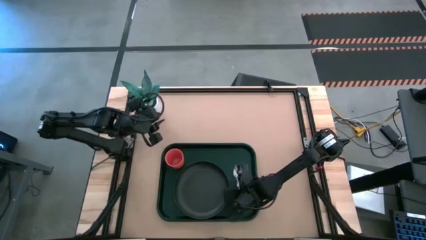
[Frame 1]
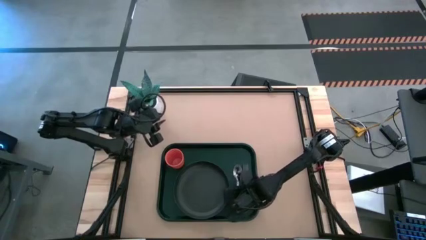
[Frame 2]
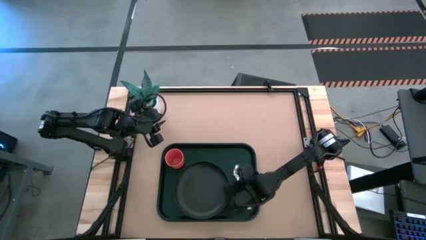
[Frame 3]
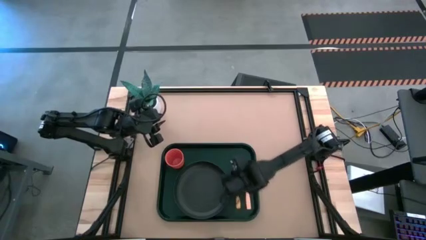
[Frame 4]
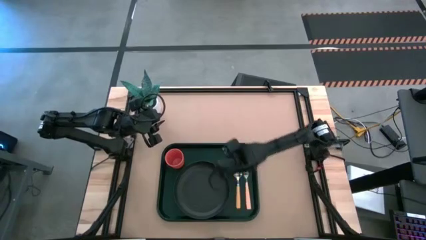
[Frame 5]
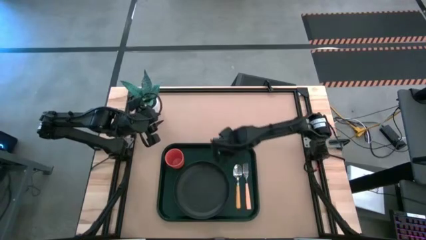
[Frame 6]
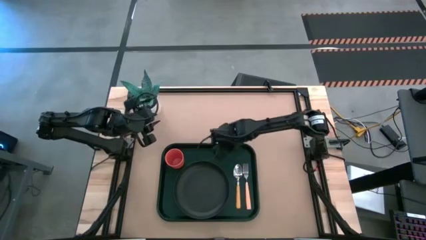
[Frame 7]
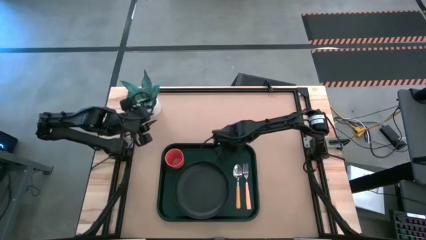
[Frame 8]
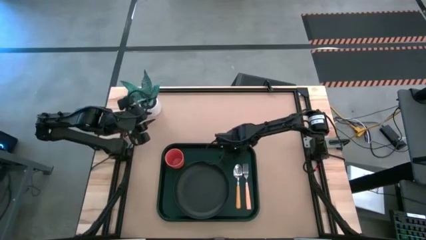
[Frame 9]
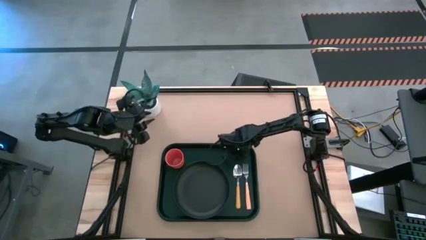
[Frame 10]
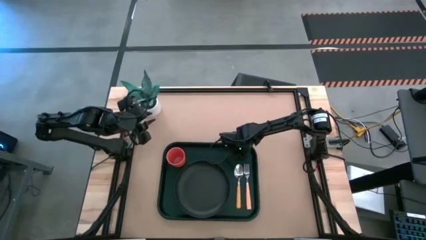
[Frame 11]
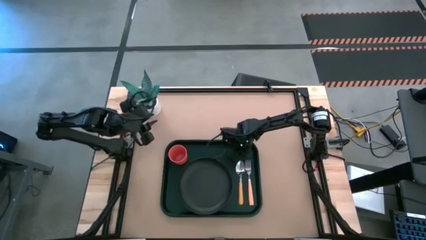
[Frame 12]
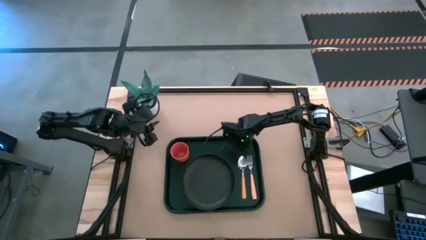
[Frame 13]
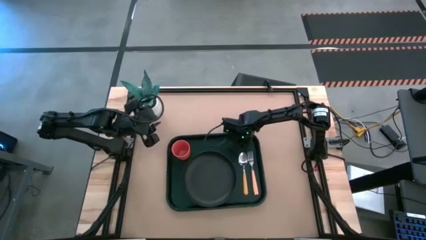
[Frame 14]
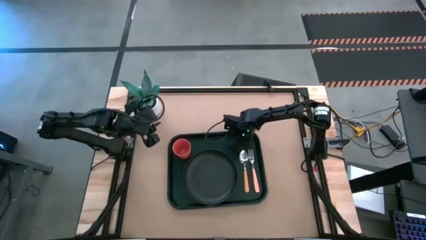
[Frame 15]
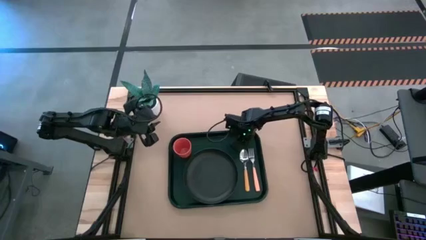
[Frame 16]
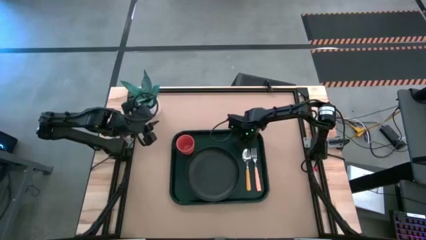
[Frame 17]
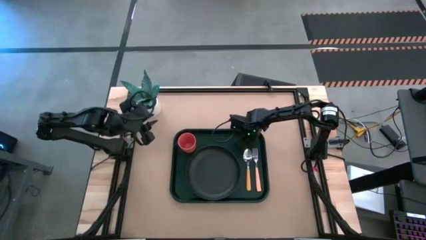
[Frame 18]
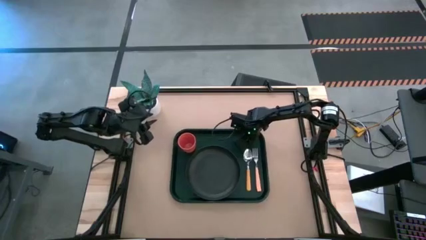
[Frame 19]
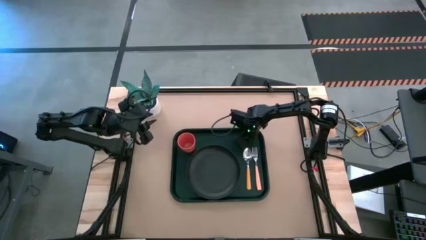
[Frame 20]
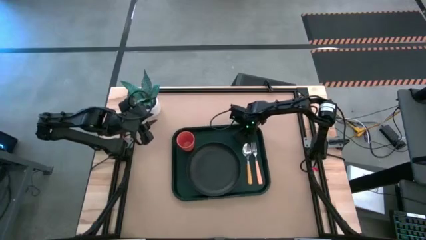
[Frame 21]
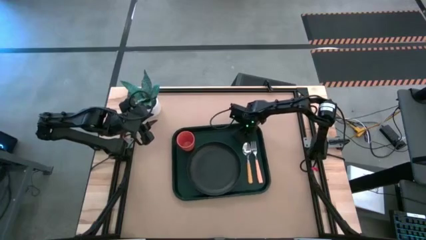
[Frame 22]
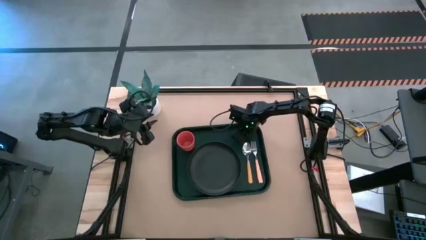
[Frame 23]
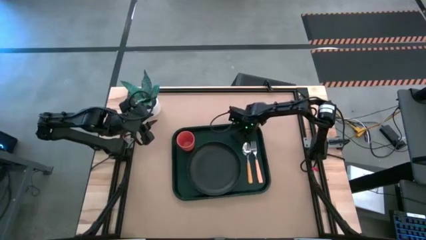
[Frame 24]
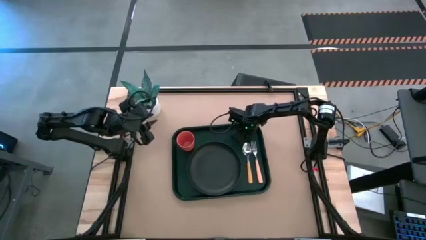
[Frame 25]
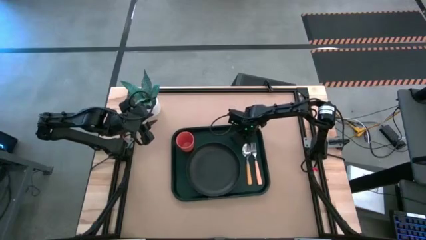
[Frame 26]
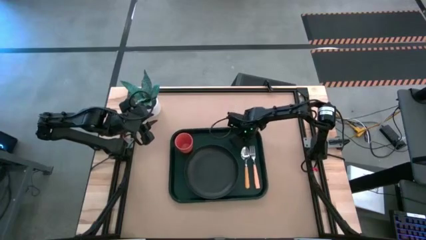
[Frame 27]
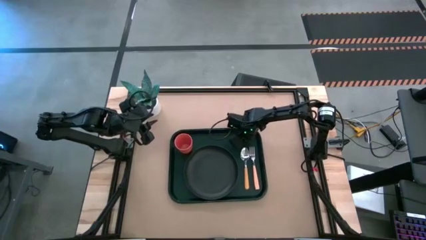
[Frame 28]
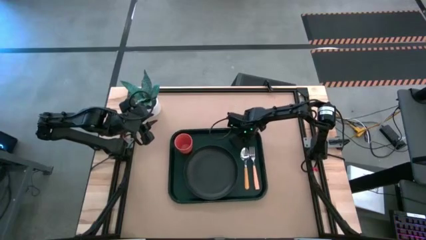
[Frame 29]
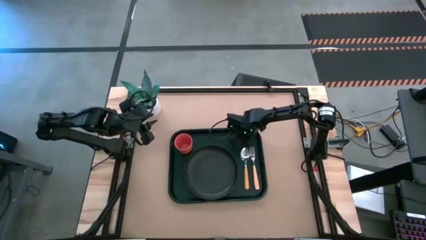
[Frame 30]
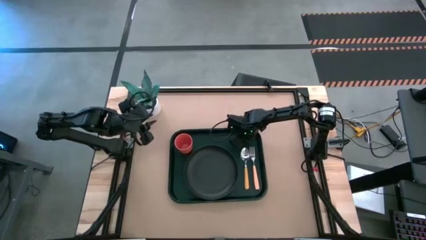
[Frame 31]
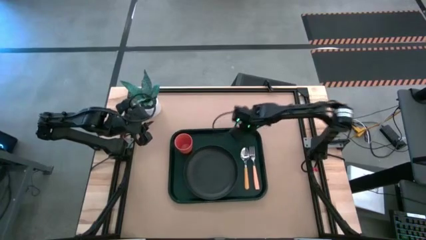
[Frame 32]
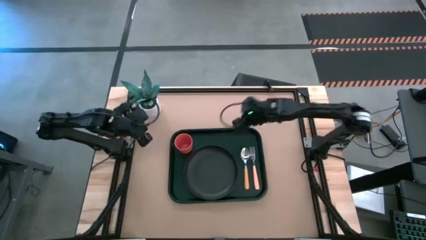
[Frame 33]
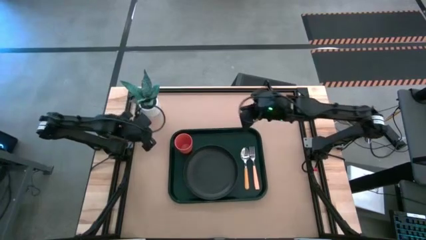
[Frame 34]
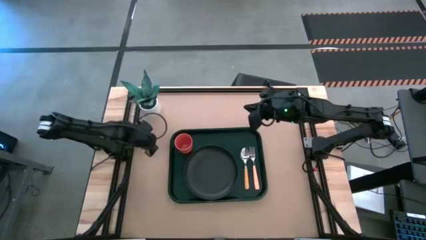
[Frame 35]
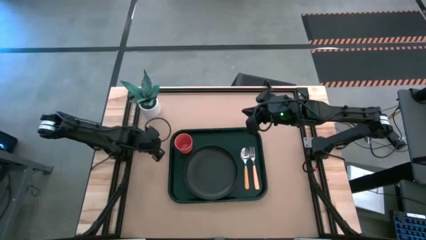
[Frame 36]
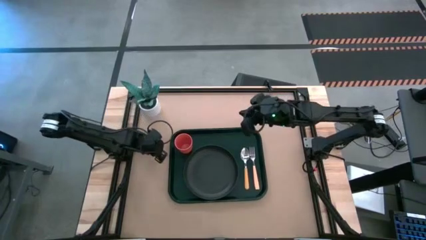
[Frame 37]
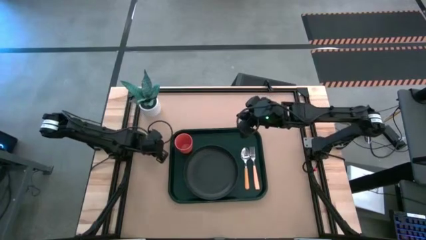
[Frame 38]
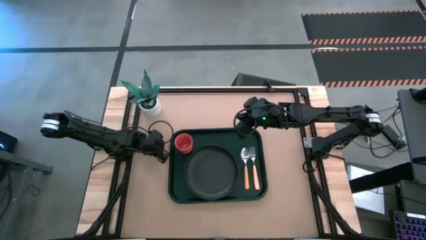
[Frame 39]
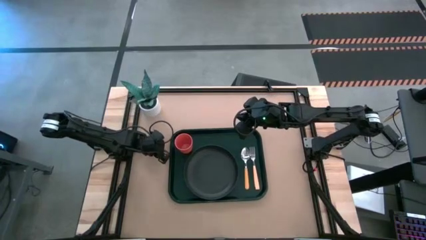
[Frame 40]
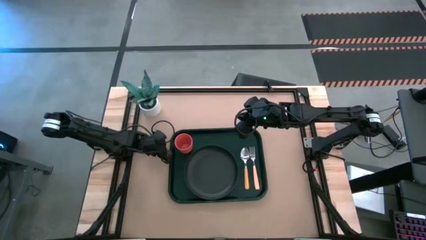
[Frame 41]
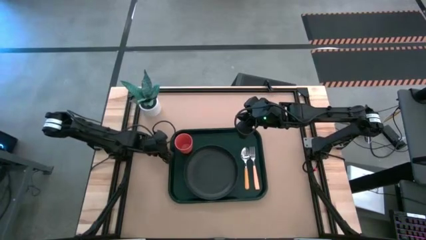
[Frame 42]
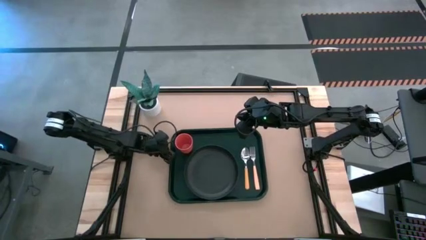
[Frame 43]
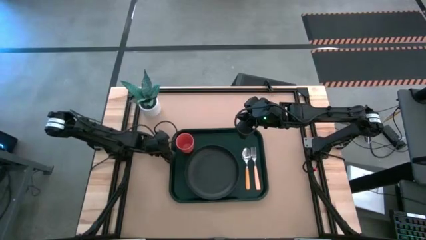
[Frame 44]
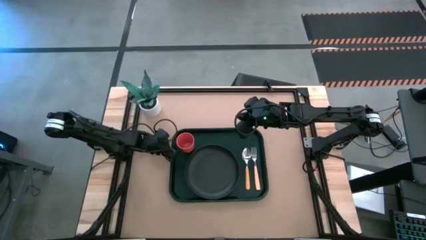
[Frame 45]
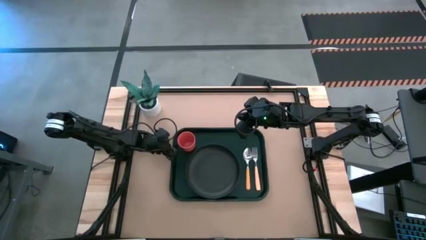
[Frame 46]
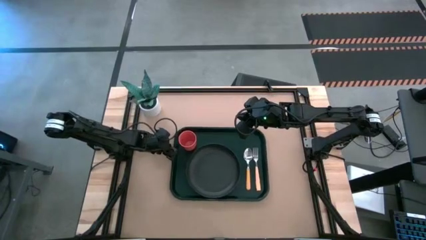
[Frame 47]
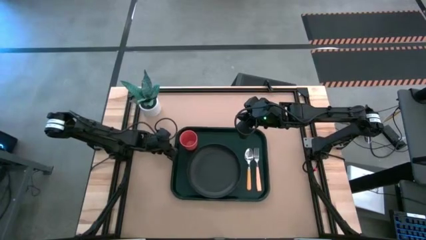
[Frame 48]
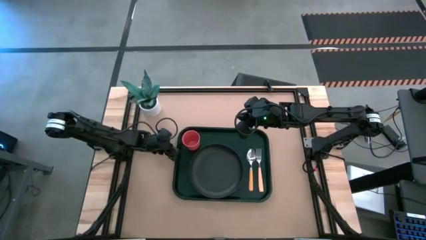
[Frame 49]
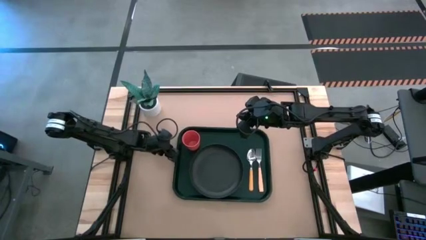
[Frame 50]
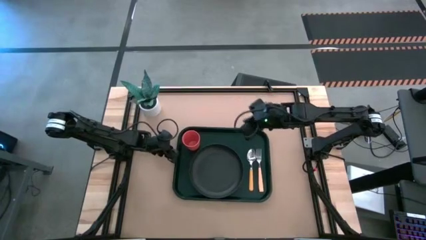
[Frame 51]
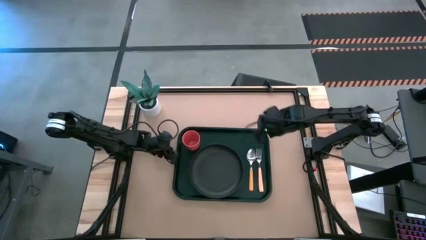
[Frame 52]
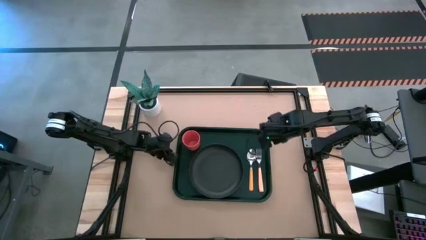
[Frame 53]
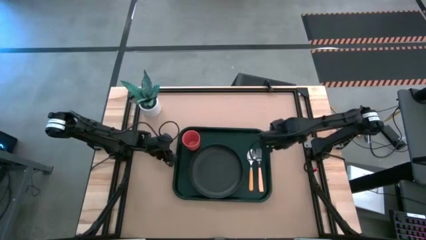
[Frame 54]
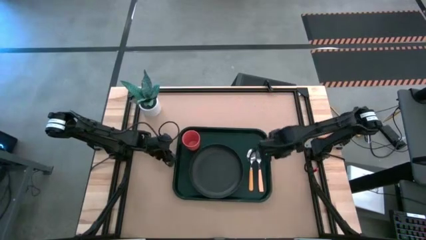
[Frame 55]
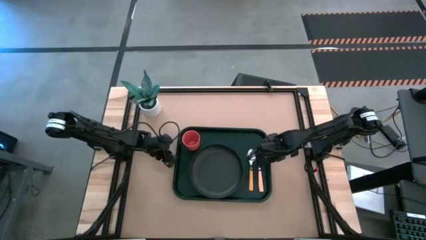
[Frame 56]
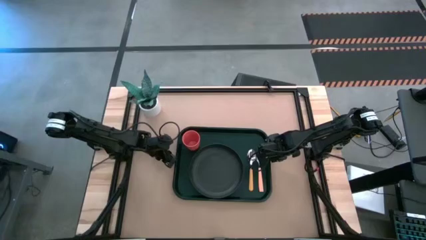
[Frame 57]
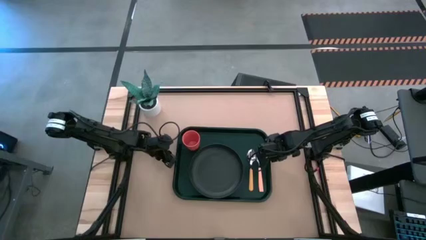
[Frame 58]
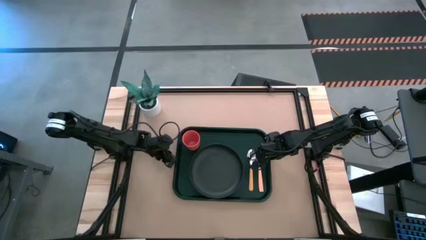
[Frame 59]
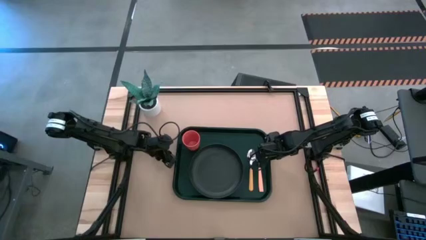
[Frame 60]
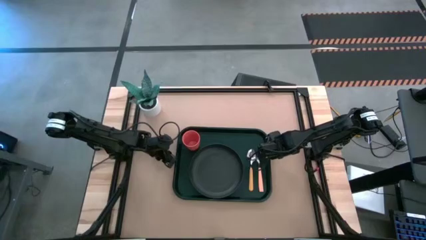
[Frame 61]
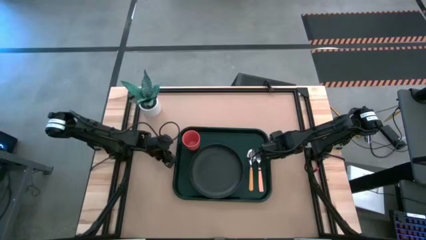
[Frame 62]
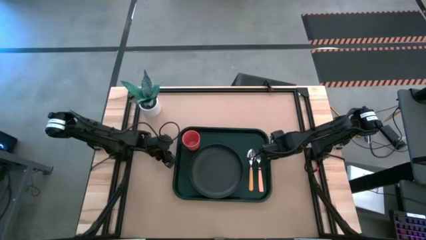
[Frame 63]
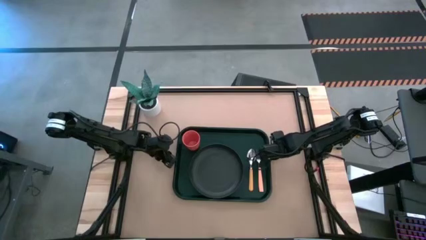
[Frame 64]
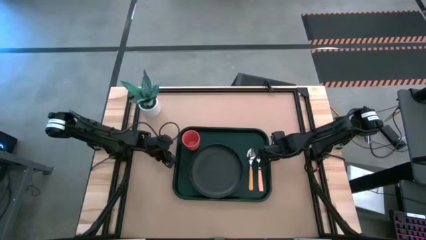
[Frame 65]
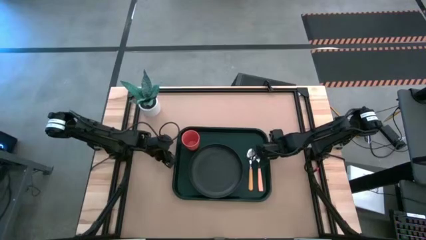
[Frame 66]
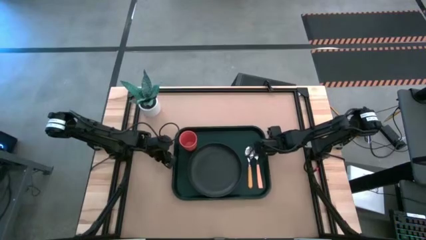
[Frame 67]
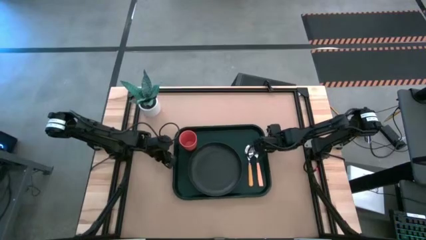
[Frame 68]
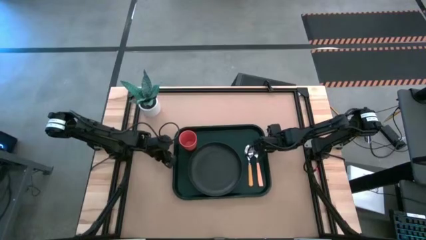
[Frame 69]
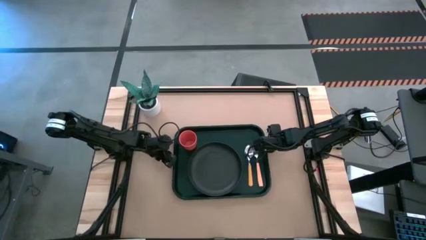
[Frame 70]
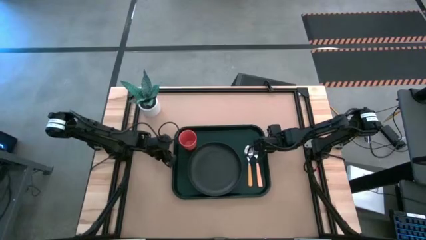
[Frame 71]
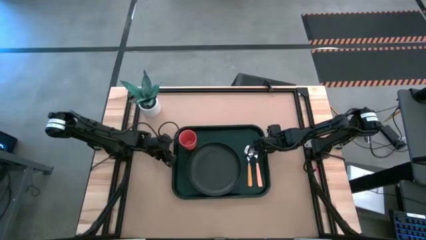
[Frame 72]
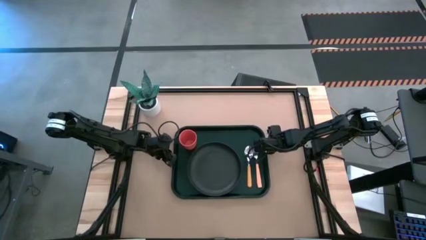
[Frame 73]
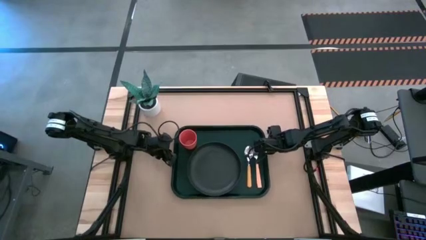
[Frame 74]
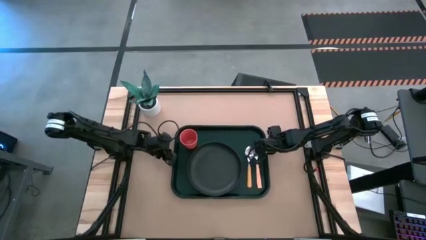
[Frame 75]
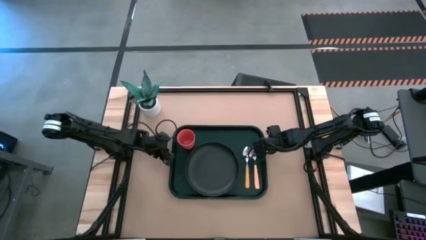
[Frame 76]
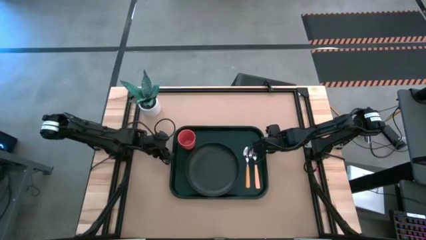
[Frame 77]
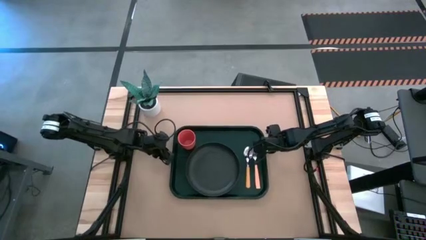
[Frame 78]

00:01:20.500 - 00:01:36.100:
Task: Pick and place plate/cup/fork/spoon on tray
Adjust the black serving tray
